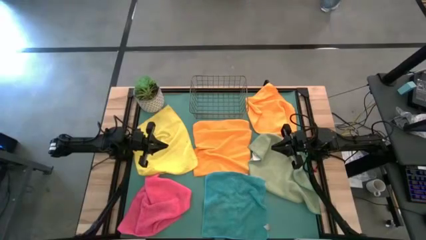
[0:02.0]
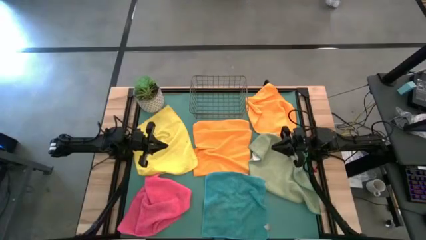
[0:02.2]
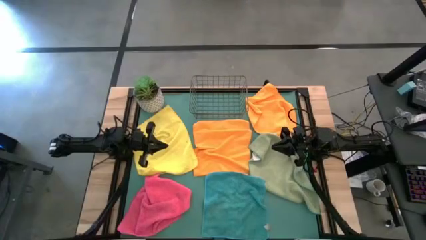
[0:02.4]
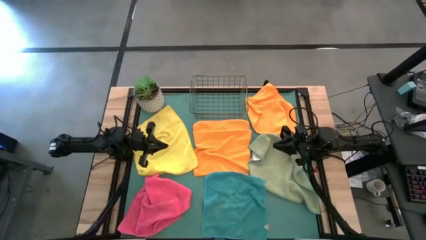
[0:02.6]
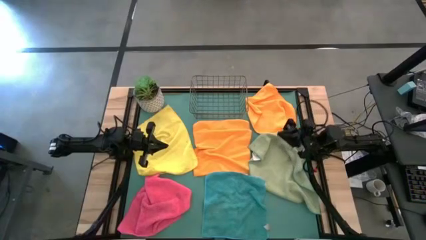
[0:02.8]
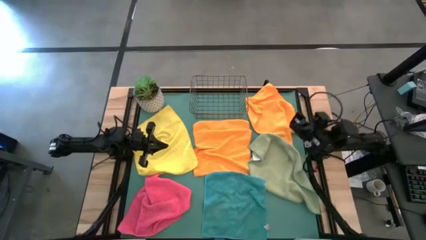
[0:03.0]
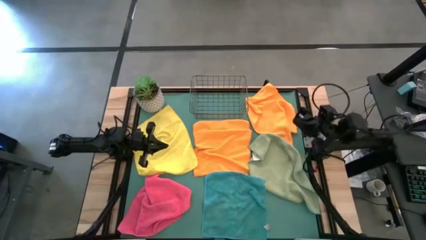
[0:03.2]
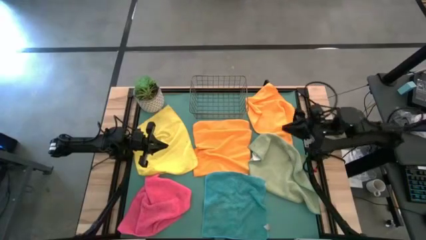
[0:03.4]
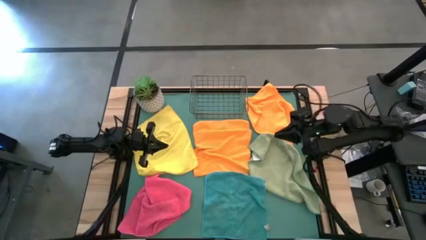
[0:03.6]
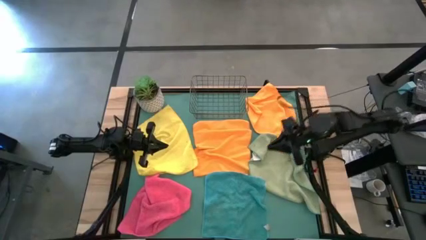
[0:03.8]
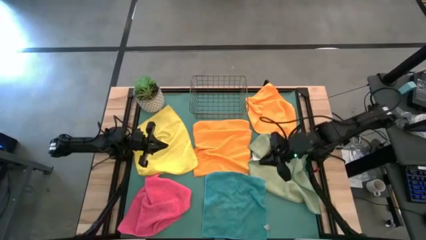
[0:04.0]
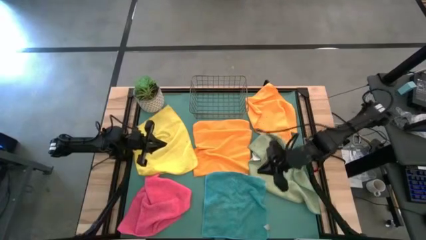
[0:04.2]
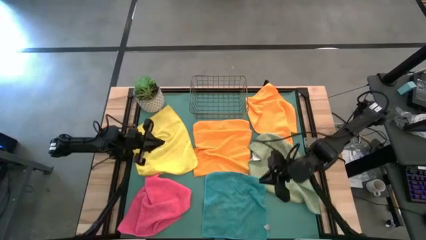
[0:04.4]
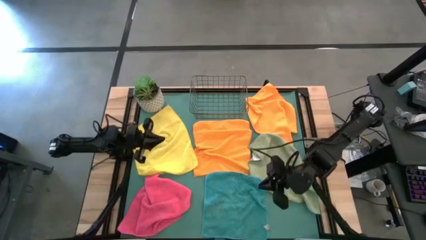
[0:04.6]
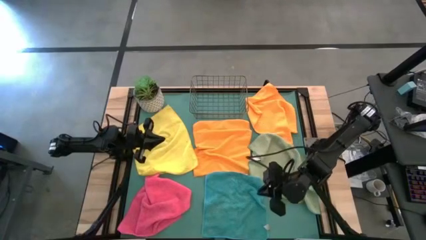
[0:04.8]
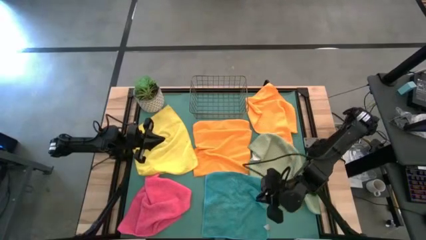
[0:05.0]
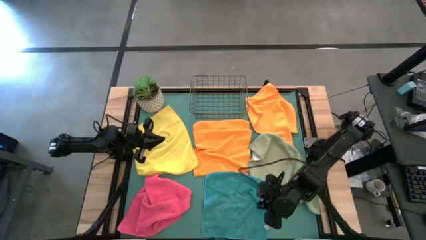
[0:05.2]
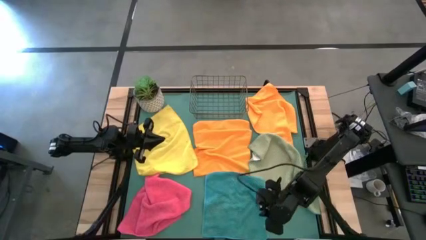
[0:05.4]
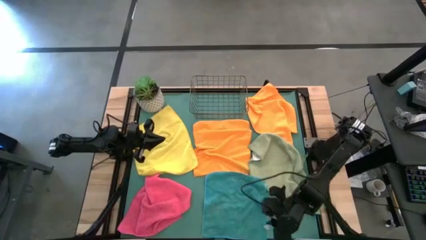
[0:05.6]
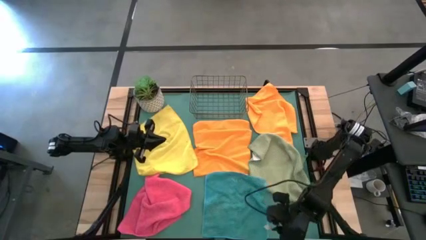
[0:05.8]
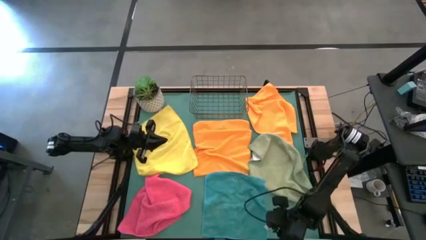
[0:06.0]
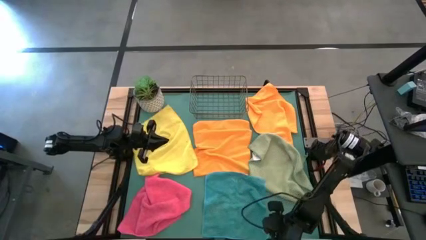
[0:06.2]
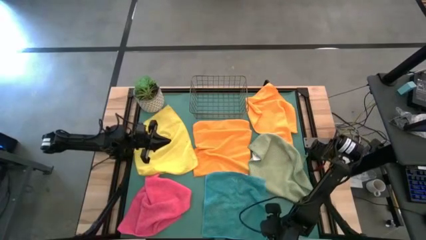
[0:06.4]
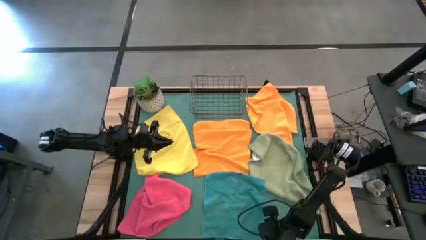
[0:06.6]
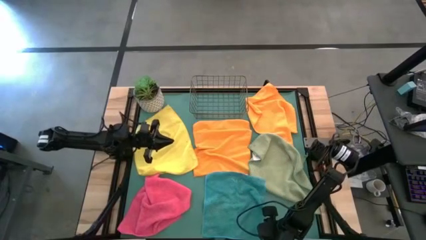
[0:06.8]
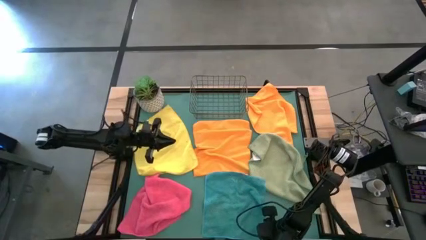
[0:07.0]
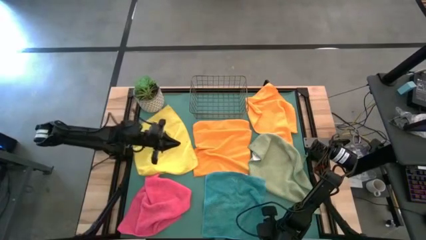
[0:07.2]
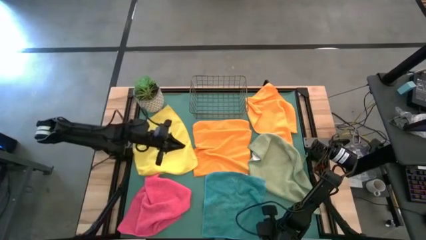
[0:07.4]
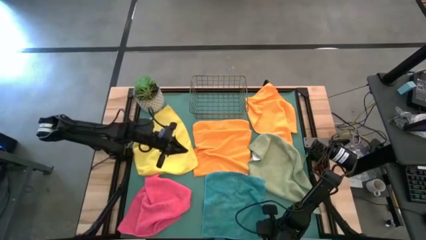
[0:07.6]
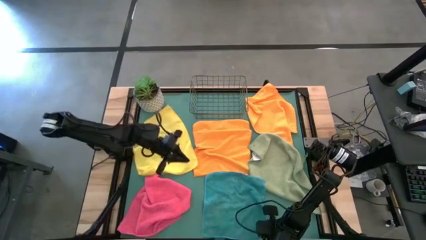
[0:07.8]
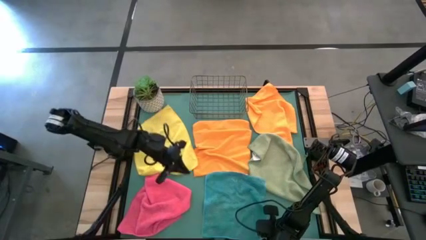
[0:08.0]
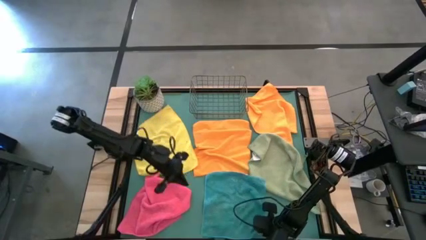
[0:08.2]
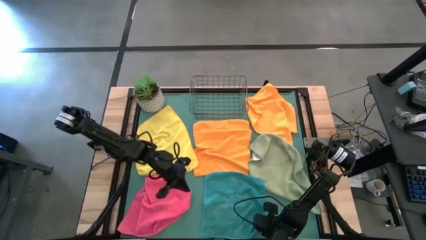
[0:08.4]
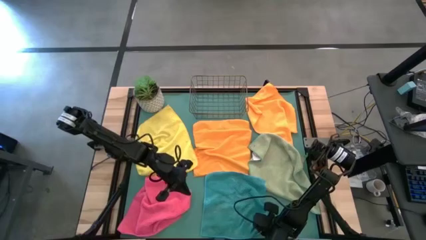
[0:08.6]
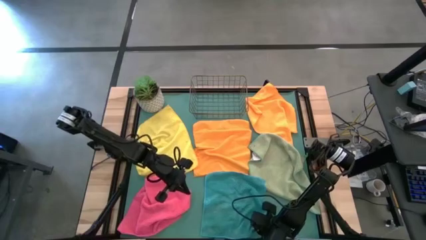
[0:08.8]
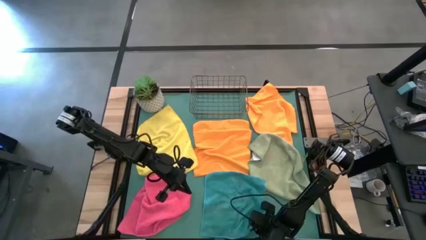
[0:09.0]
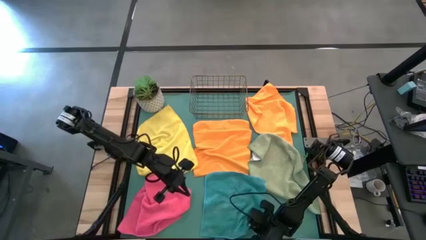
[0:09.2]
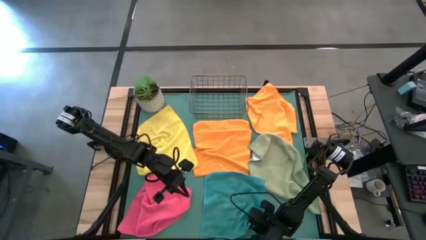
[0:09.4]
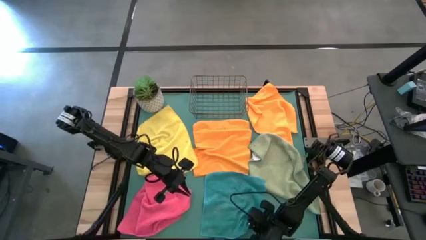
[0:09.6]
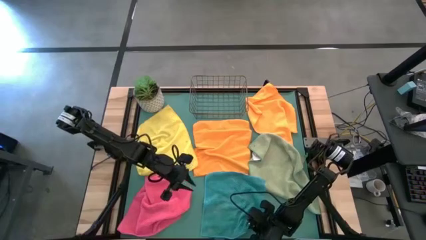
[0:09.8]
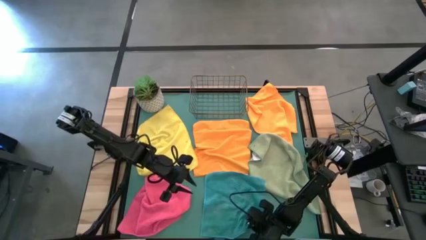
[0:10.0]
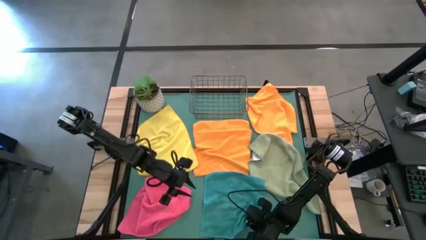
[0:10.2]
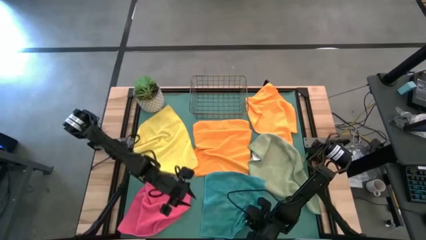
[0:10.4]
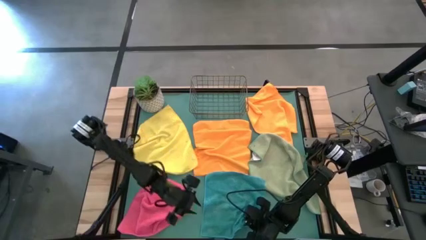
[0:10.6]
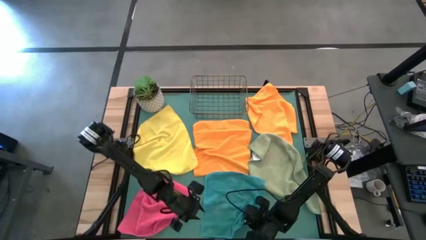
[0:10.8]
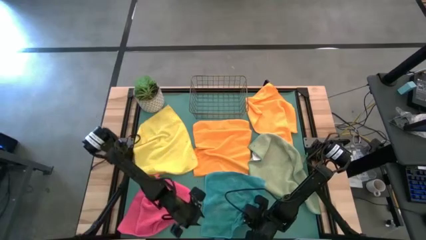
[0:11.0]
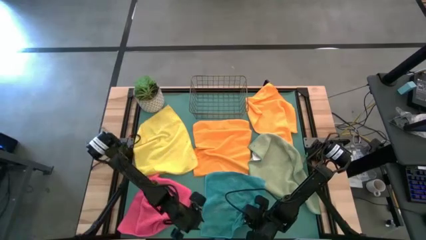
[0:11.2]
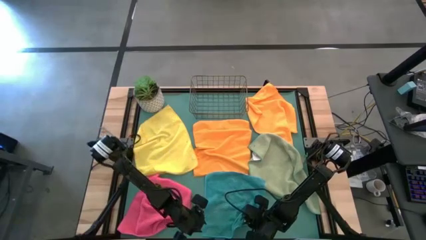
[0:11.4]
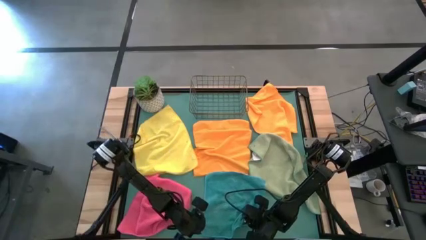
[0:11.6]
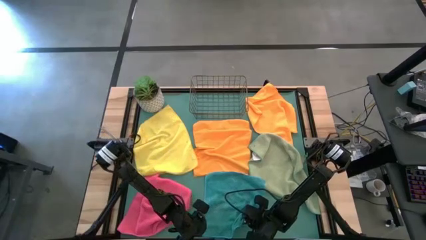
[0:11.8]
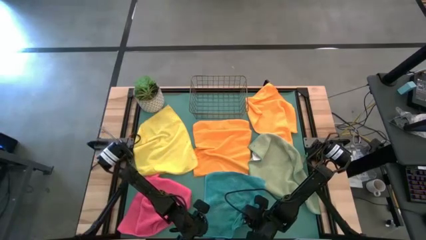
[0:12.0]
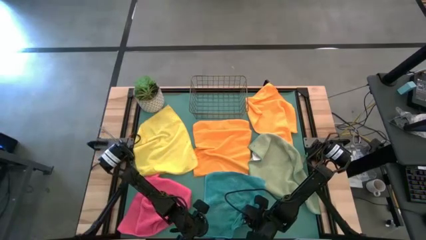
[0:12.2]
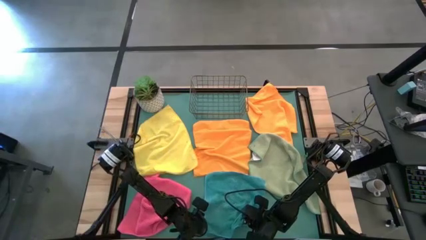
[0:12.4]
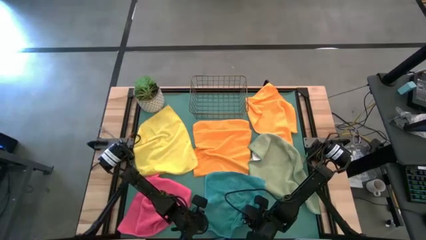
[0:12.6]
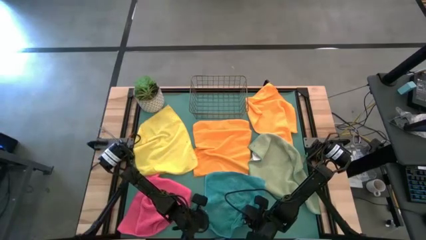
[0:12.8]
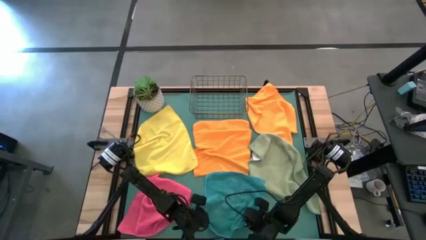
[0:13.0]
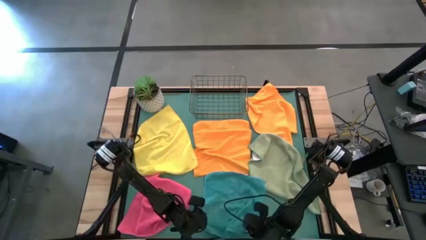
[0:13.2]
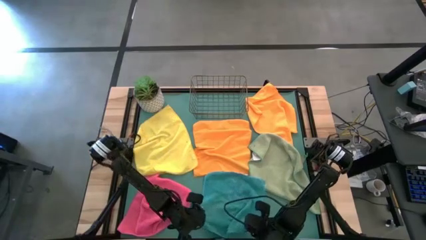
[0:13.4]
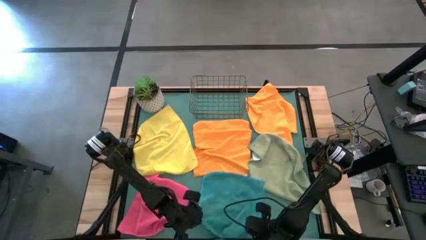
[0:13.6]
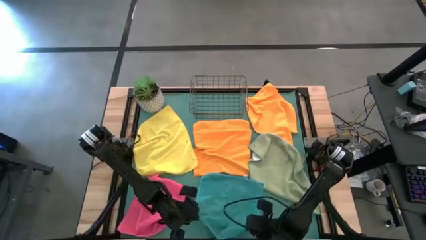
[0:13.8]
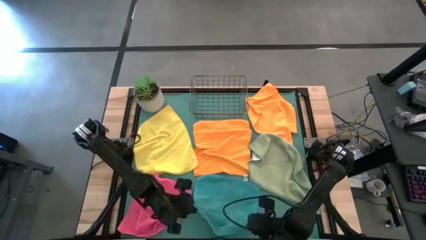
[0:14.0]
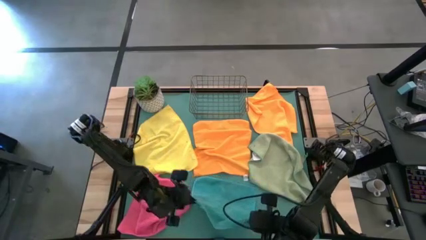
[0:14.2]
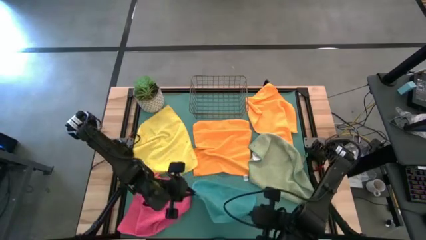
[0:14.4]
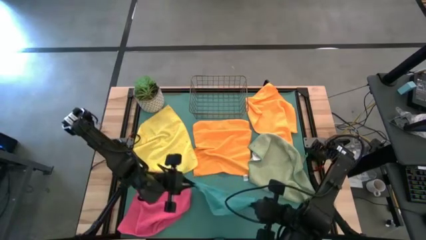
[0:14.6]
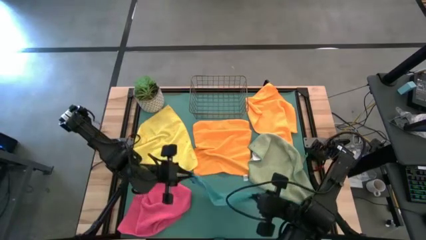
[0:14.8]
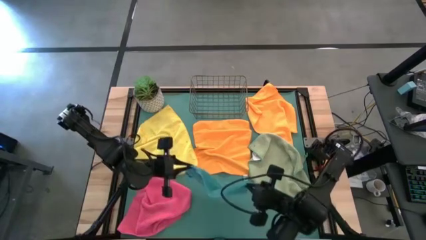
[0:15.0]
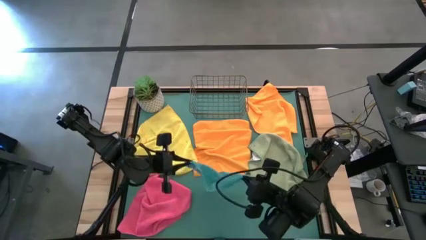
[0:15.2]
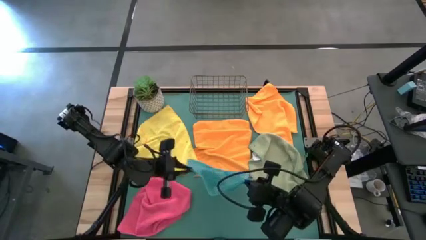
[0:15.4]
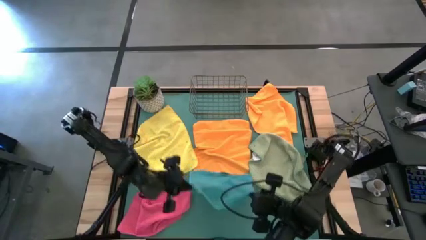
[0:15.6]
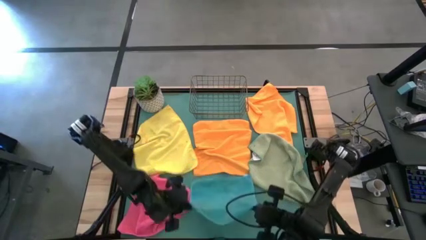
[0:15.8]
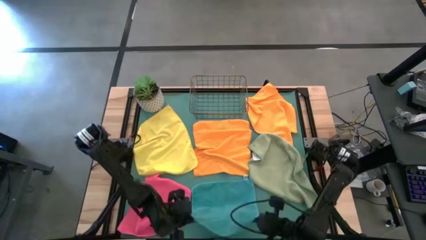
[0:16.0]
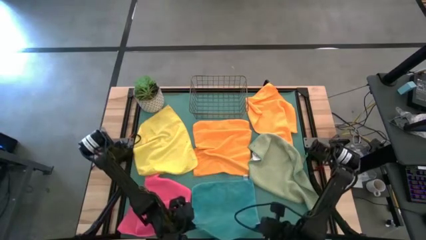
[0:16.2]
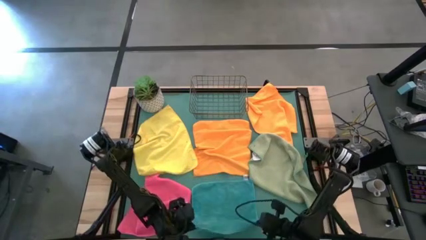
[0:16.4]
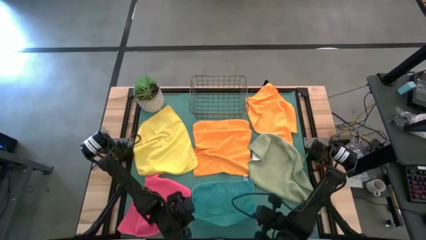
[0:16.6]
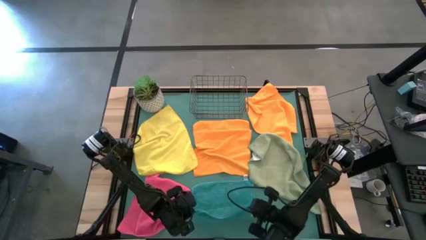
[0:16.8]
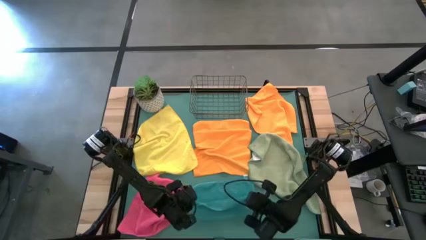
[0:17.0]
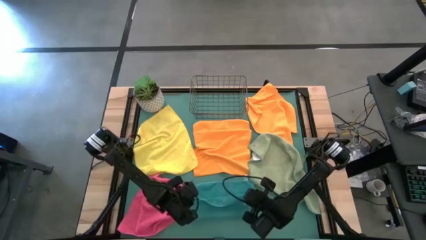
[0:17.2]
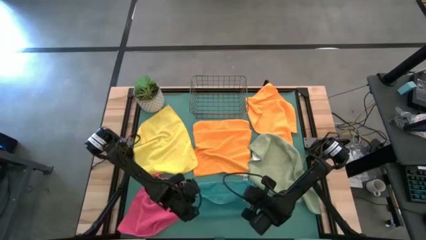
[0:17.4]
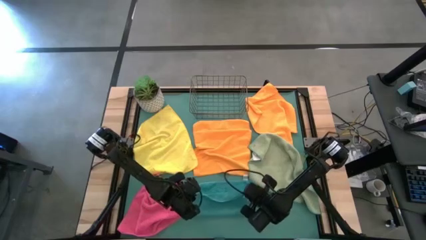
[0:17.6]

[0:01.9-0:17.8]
Task: Fold microfiber towels
Fold the blue microfiber cloth
